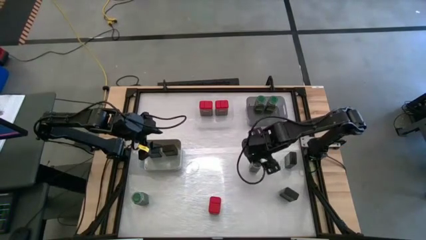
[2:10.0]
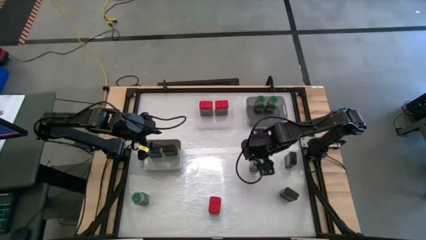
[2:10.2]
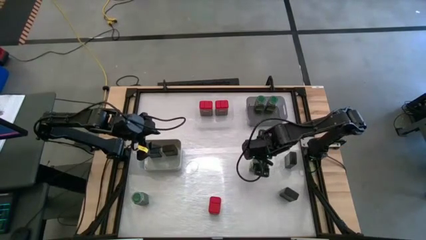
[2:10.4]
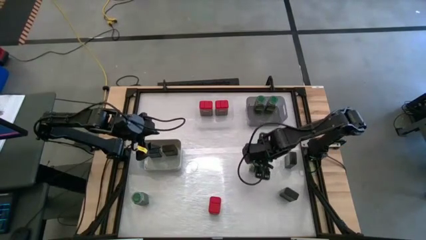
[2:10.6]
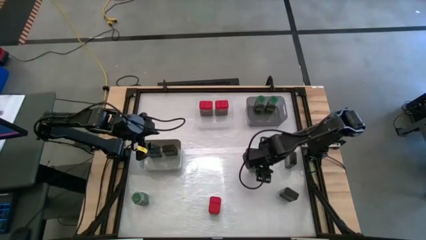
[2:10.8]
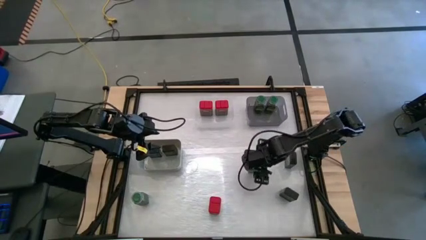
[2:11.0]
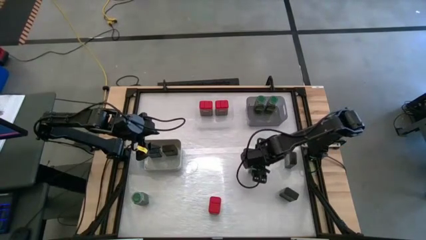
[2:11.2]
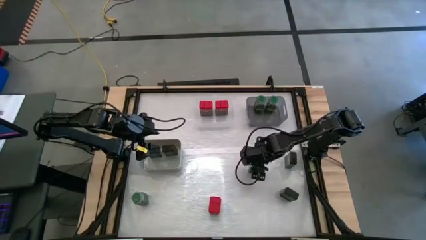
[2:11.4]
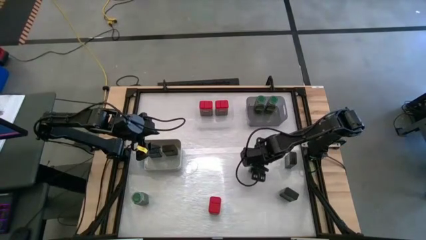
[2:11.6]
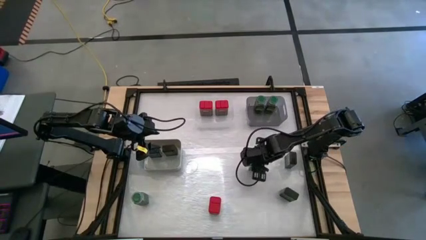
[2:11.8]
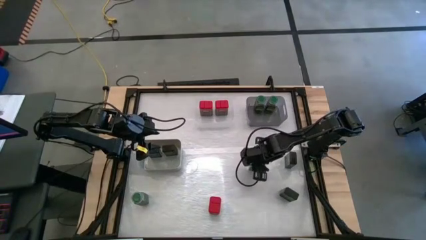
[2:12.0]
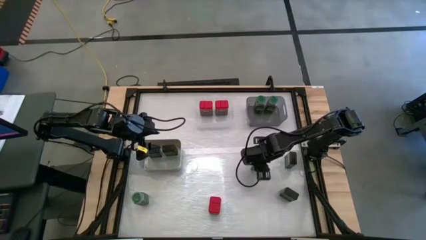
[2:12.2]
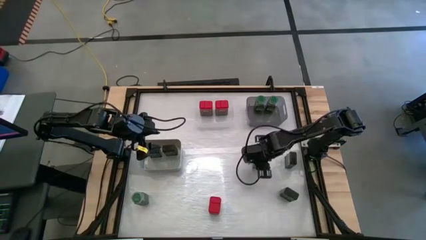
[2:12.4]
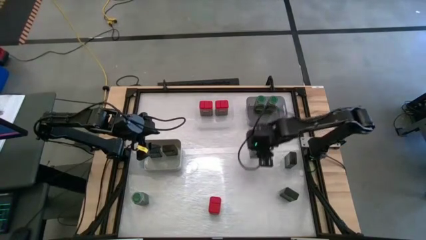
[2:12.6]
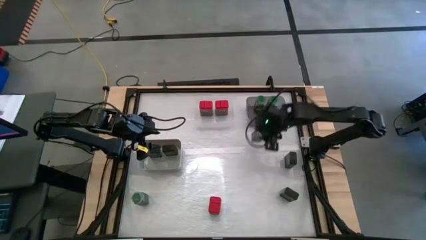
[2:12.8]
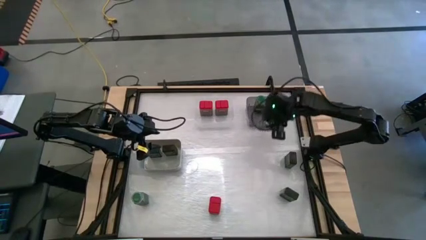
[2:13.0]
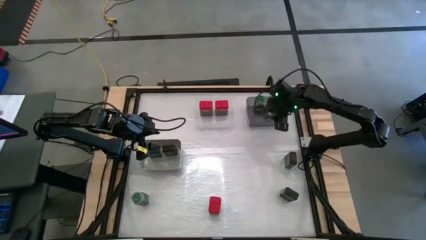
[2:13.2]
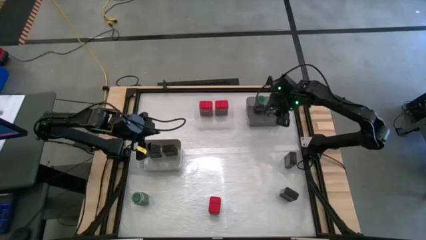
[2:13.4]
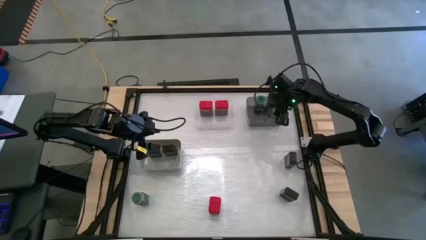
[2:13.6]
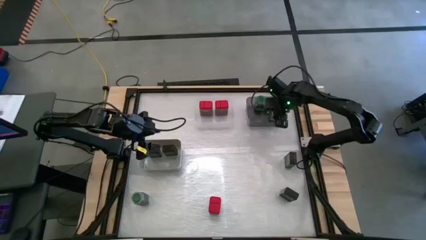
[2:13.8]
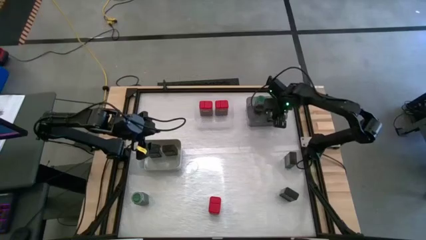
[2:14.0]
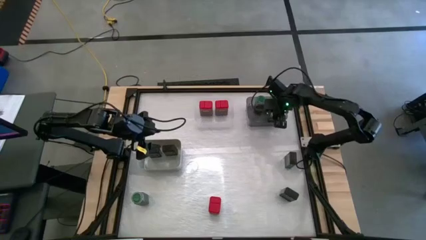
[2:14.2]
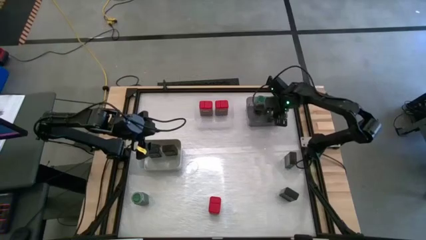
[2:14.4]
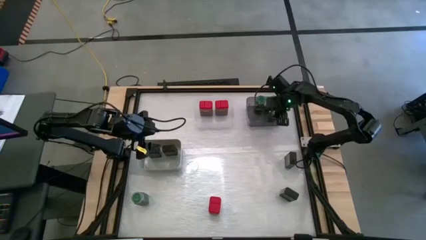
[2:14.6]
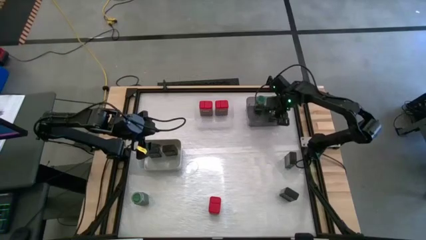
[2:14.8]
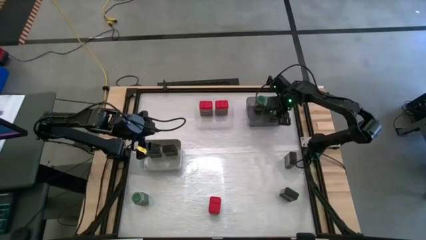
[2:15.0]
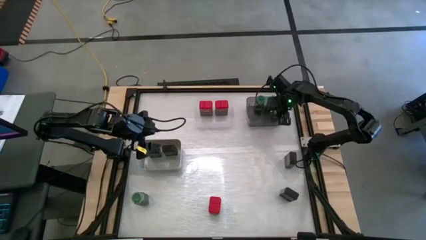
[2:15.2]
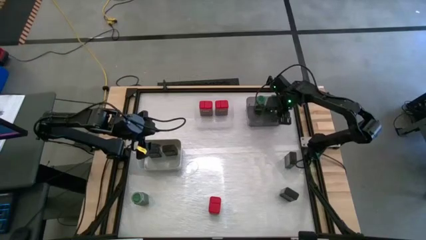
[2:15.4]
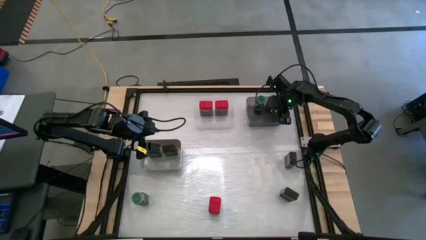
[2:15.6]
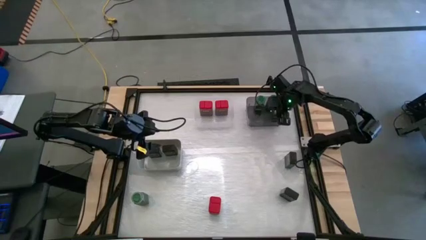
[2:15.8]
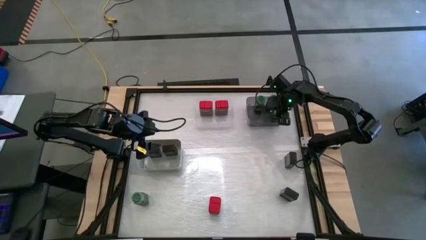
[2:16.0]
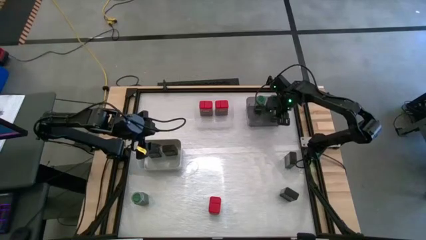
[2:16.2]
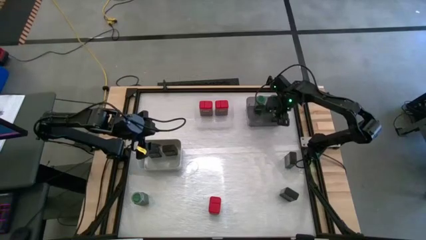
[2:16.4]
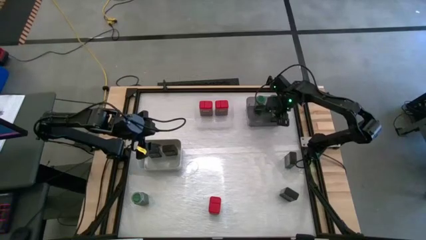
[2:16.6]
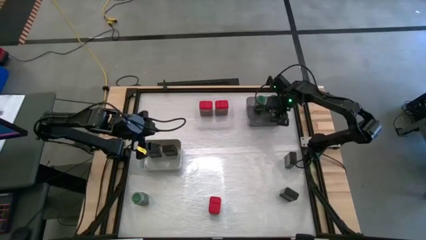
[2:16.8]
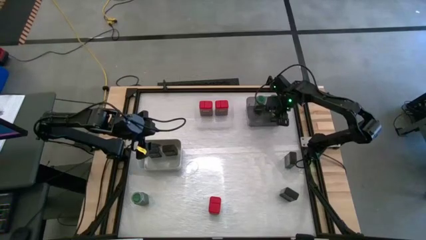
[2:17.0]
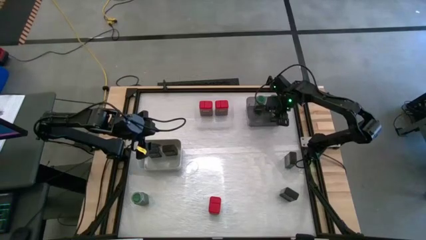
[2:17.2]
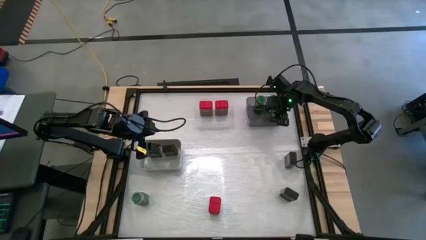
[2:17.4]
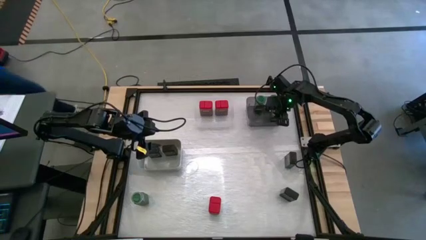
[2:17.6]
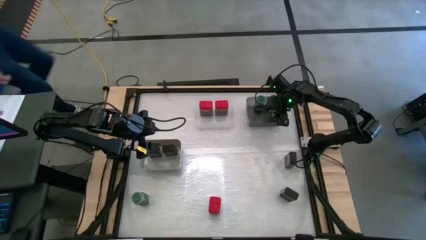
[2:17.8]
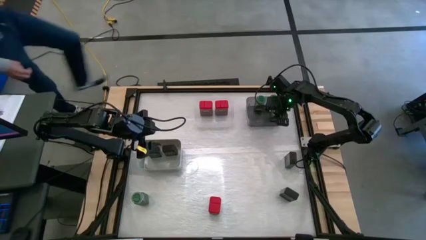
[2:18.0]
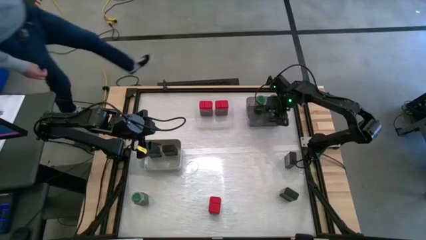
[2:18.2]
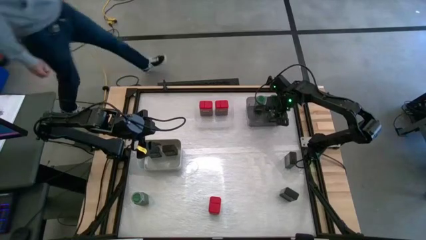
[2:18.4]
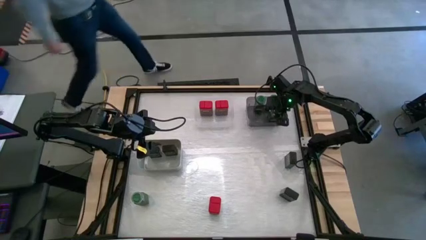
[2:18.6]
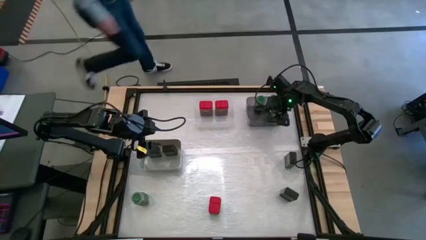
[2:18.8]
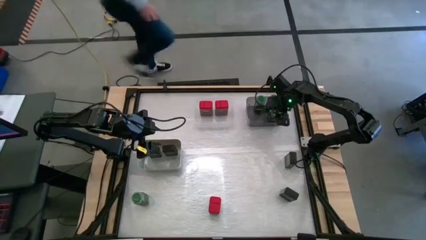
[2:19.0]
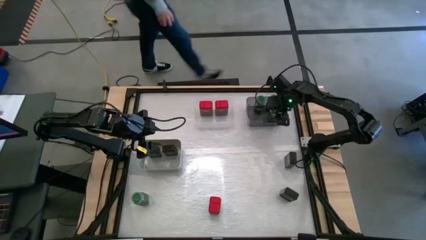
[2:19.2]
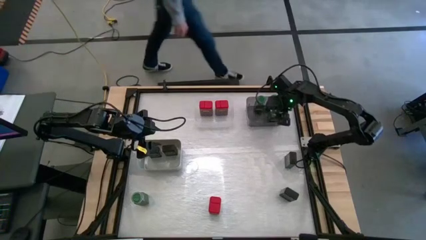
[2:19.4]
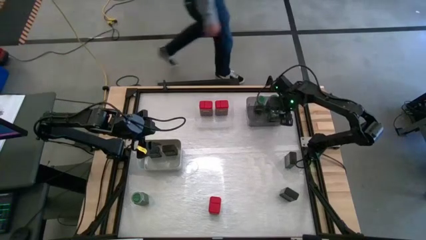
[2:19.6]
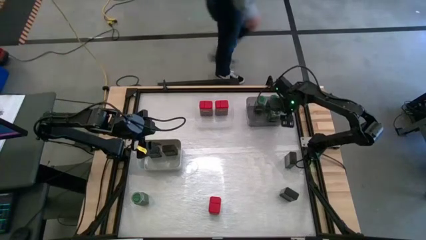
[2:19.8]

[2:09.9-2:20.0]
Task: Sort spices by type
Put the green seasoning bottle into the black bin

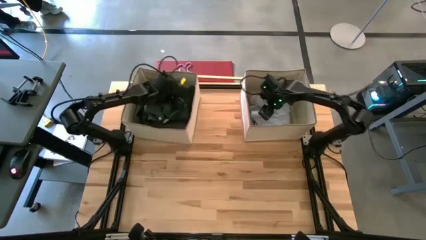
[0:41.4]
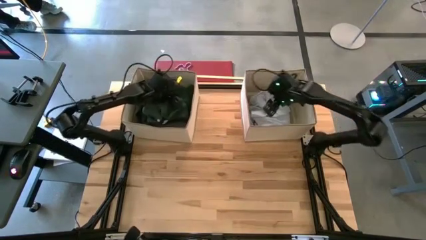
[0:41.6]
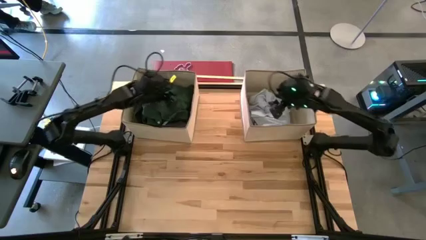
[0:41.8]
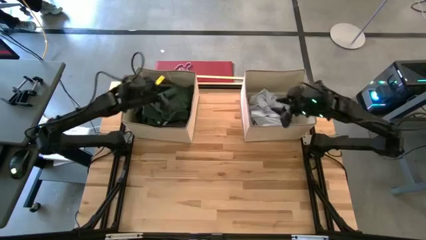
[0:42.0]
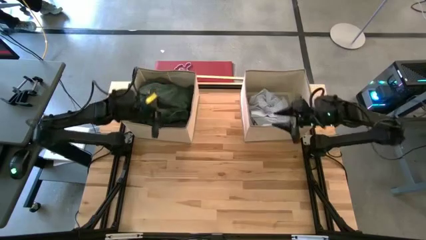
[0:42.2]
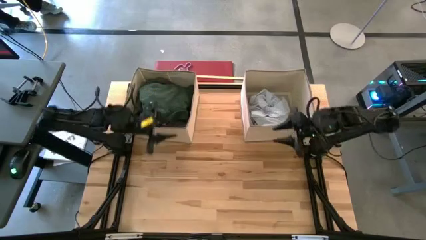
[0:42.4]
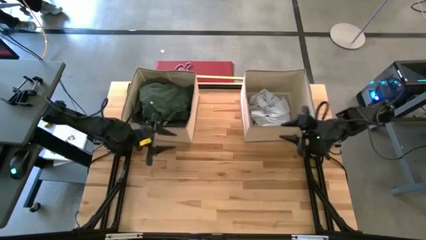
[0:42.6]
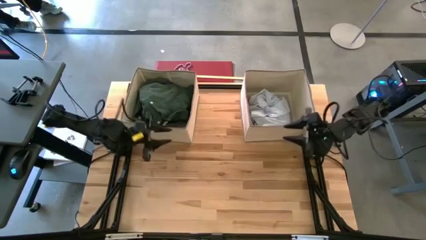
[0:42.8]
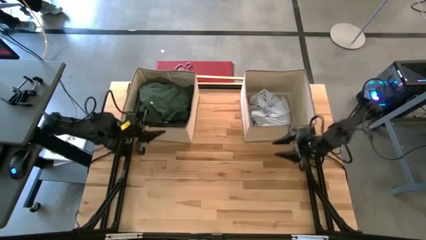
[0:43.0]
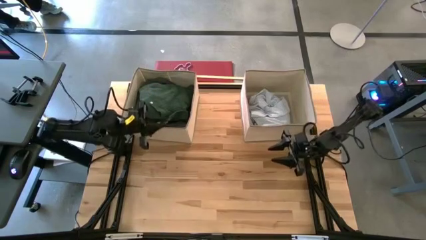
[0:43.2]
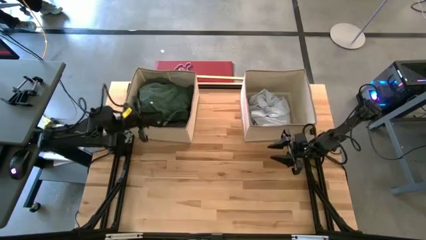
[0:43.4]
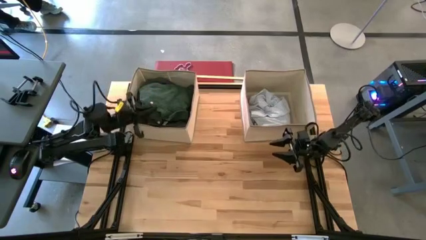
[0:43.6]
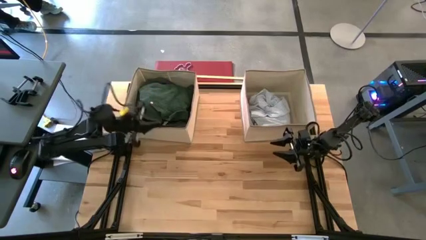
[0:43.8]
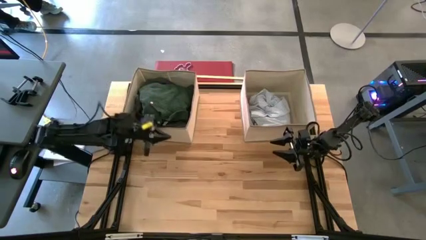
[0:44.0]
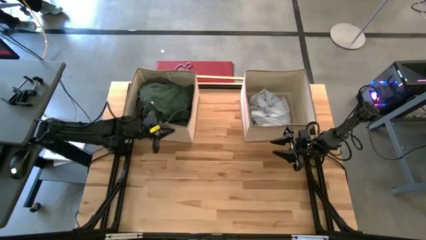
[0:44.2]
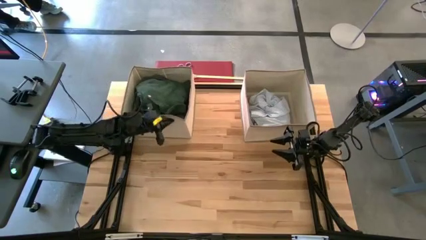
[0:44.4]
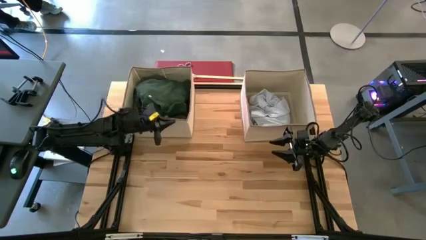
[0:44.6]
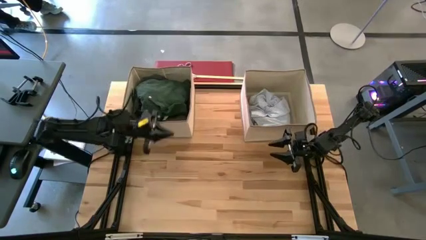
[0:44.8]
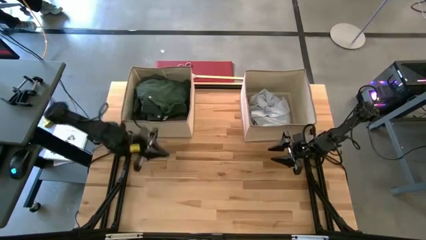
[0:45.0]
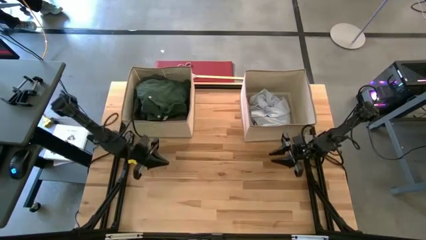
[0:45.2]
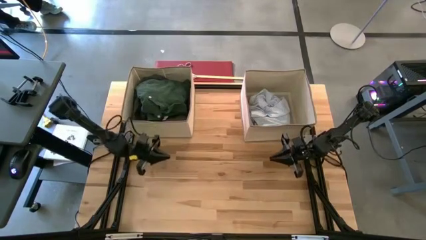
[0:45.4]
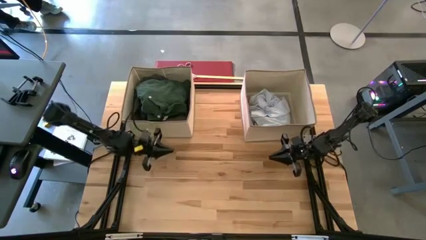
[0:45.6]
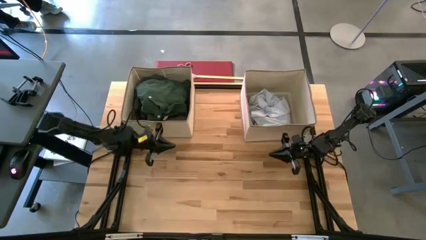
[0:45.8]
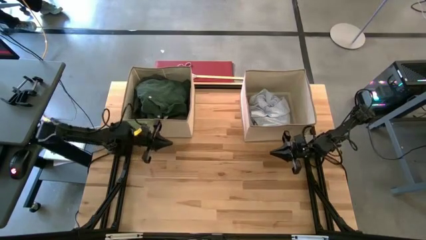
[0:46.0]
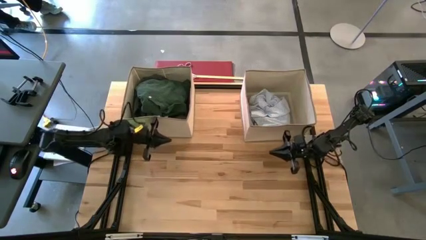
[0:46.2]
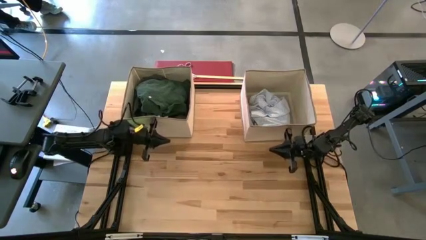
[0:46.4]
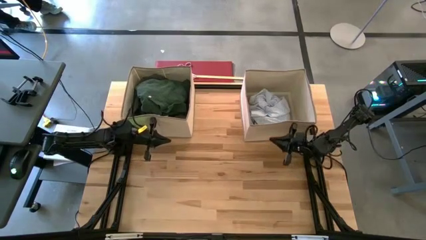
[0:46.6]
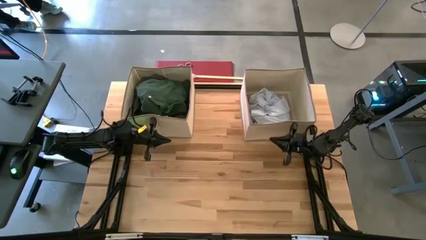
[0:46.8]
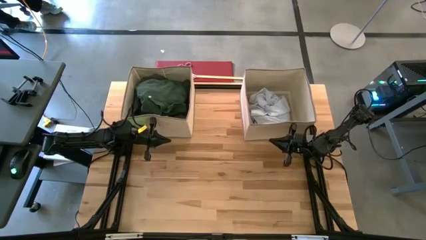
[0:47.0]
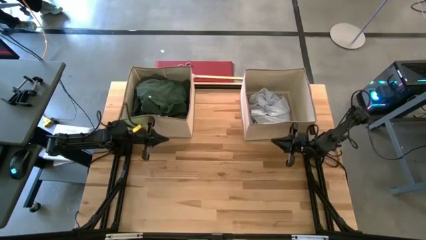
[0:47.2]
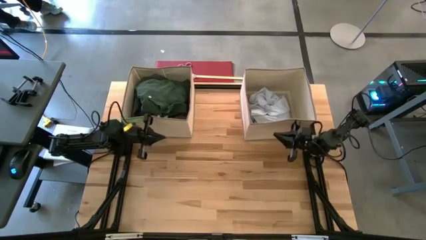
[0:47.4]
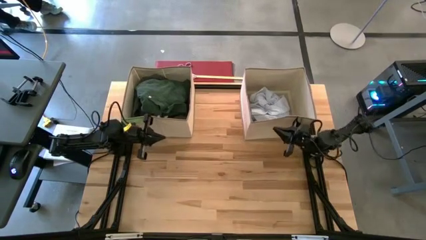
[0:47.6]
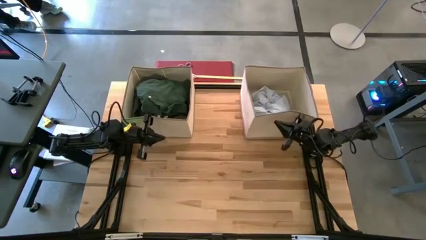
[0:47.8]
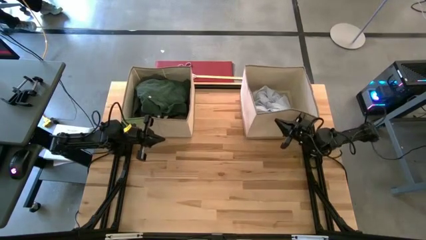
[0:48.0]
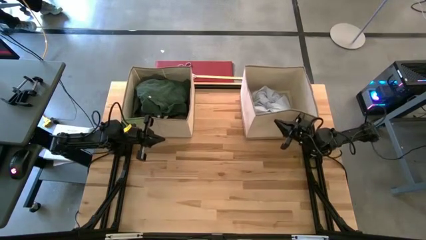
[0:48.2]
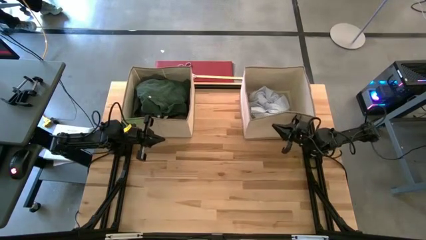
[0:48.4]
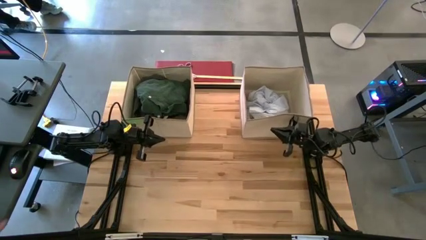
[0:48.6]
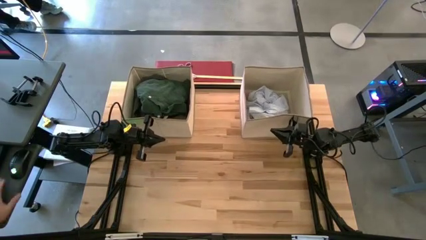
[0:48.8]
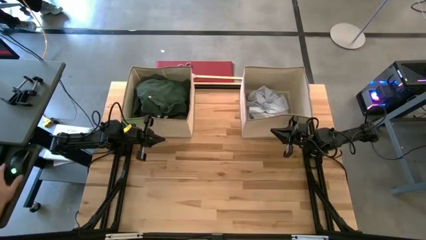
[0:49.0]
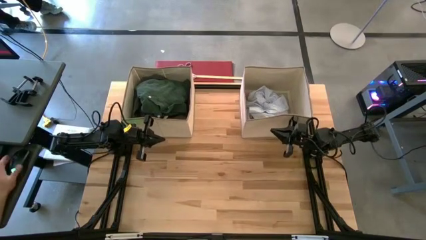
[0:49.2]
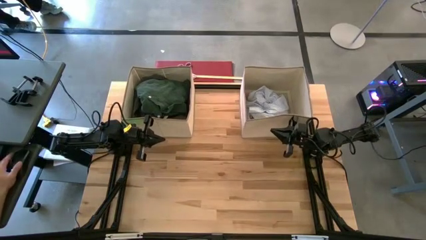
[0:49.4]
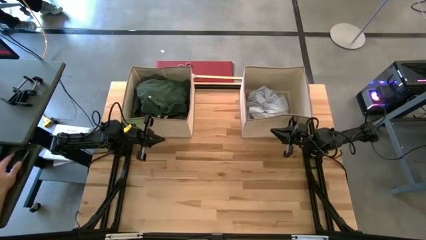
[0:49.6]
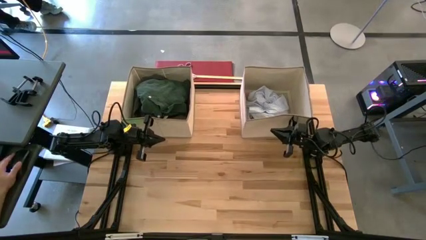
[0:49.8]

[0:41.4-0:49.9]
Task: Sort clothes
Return to Home Position
